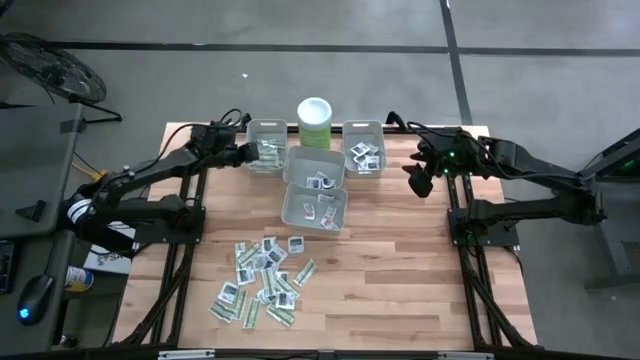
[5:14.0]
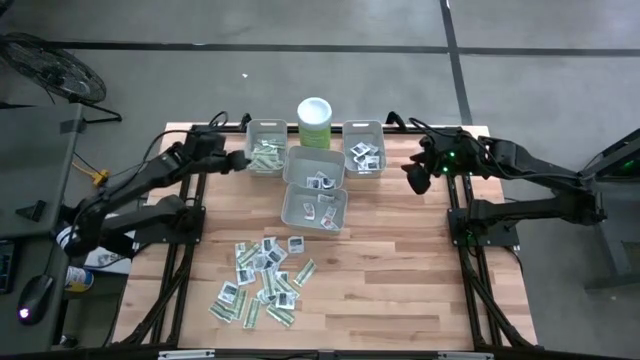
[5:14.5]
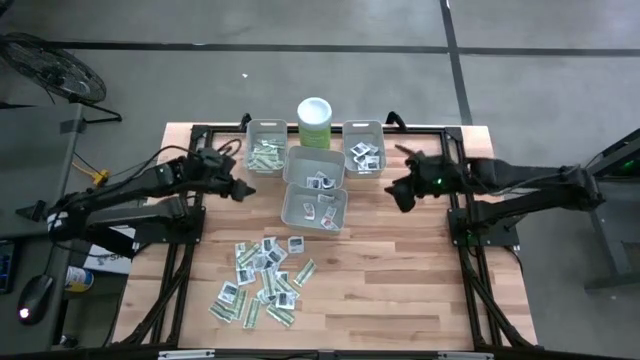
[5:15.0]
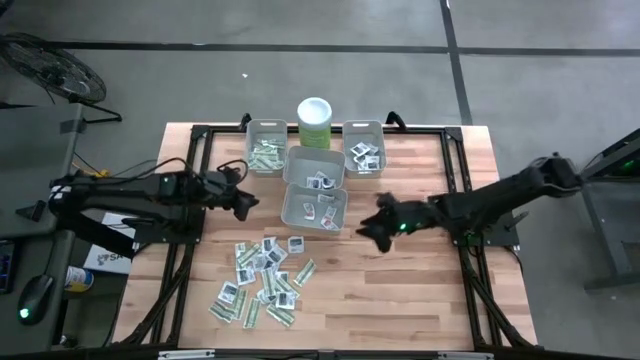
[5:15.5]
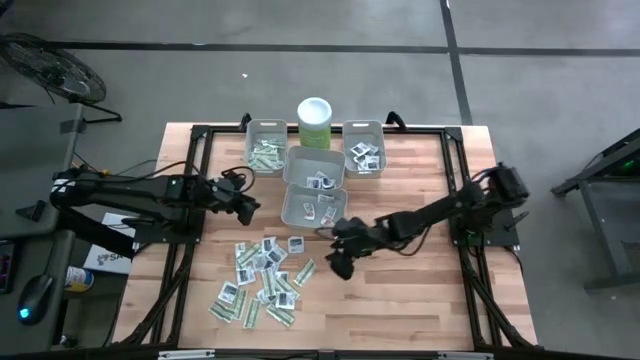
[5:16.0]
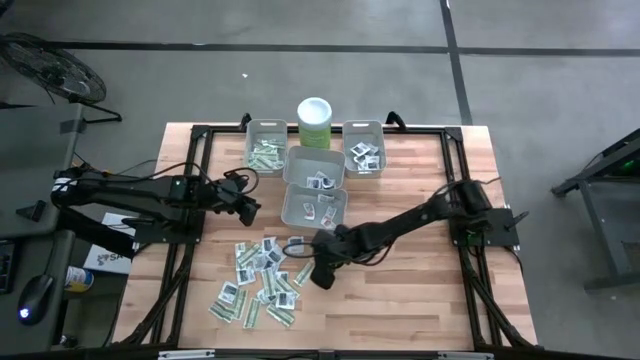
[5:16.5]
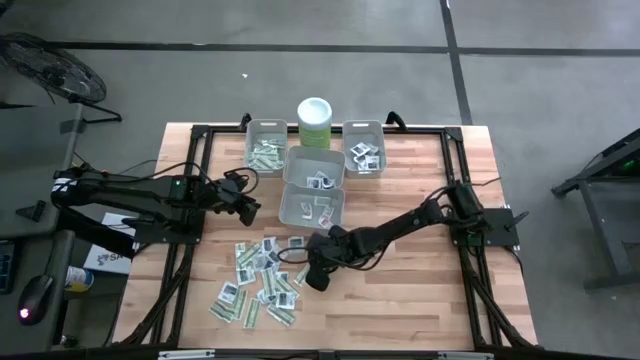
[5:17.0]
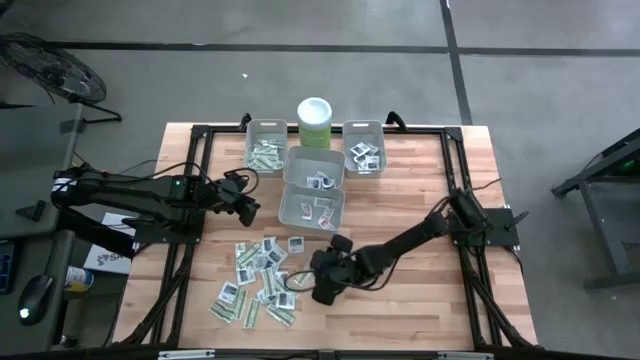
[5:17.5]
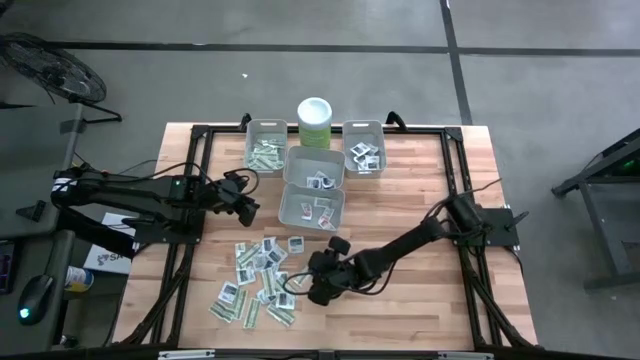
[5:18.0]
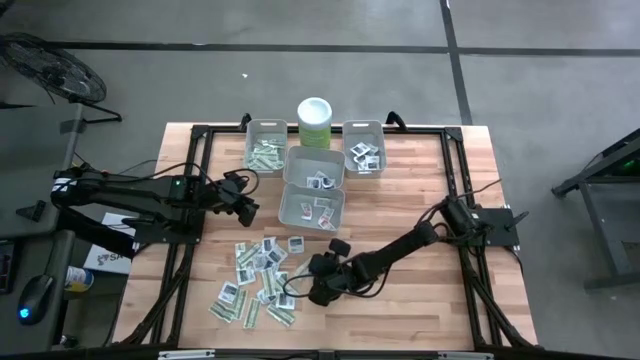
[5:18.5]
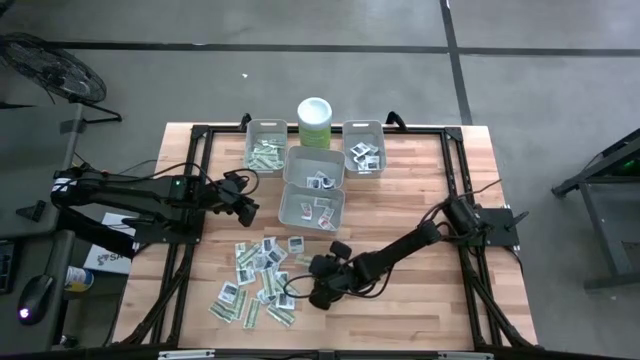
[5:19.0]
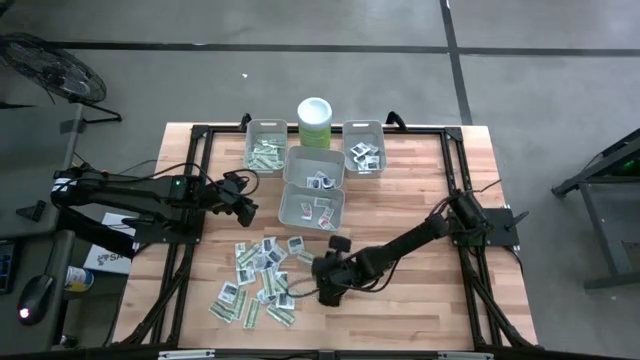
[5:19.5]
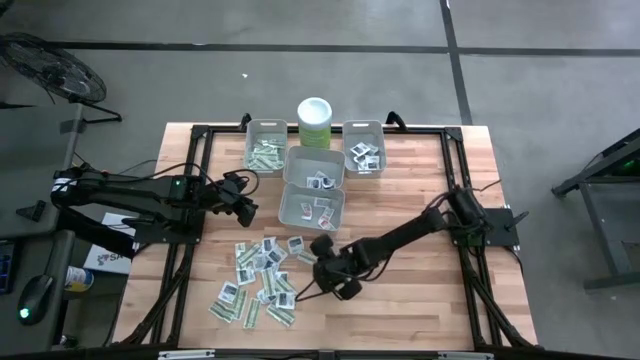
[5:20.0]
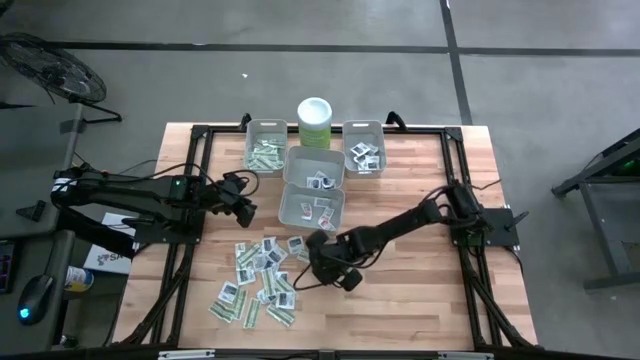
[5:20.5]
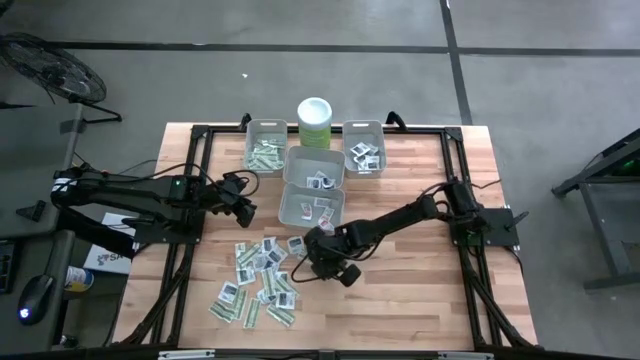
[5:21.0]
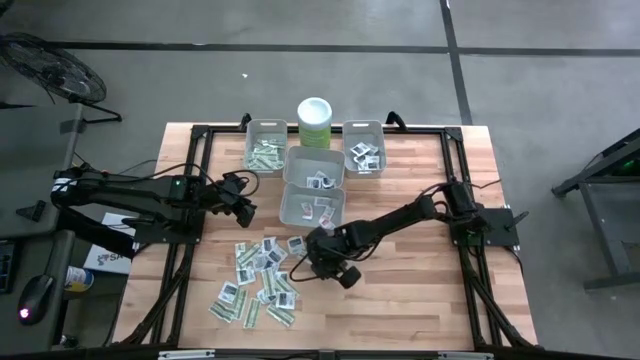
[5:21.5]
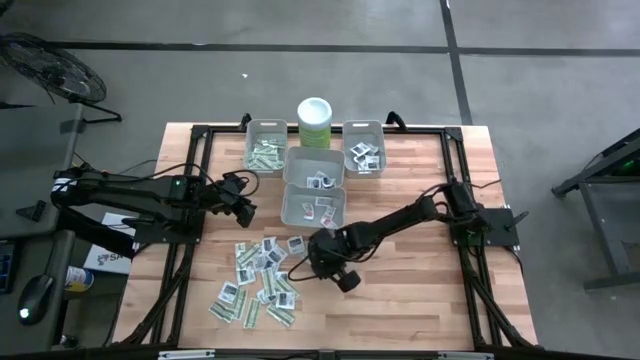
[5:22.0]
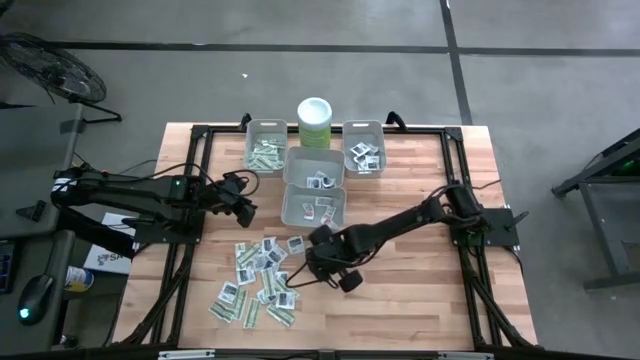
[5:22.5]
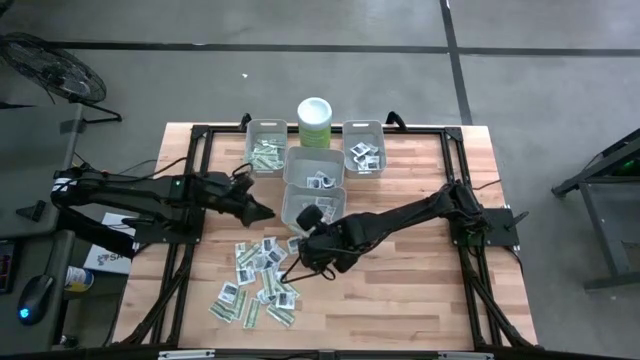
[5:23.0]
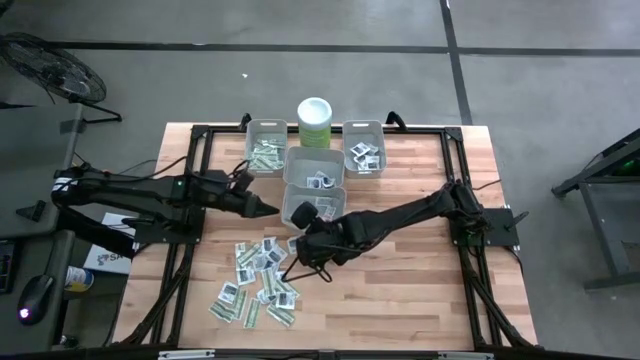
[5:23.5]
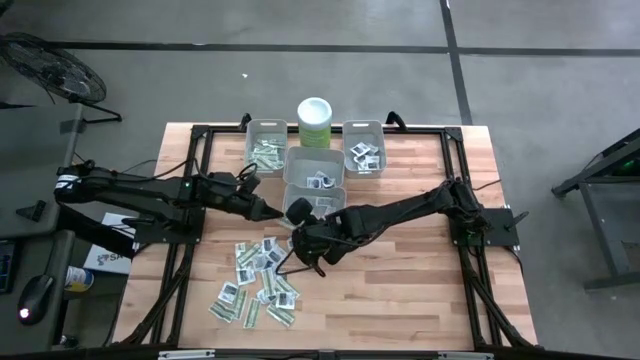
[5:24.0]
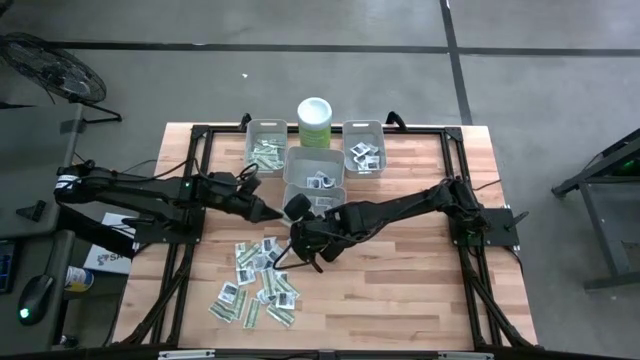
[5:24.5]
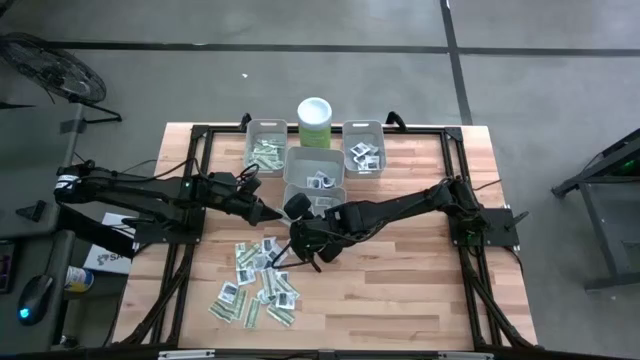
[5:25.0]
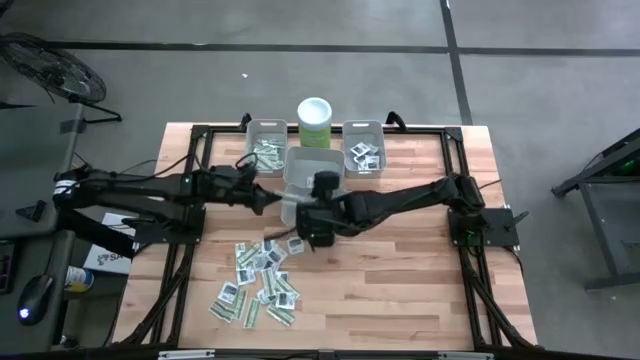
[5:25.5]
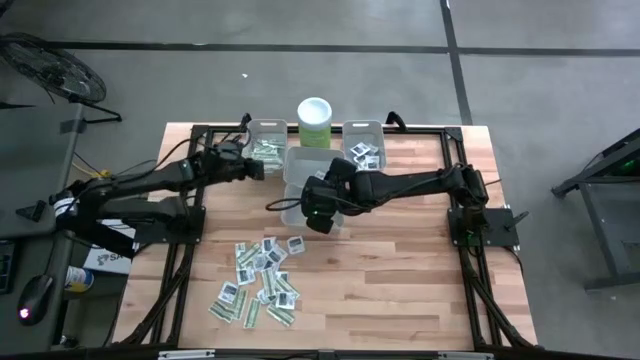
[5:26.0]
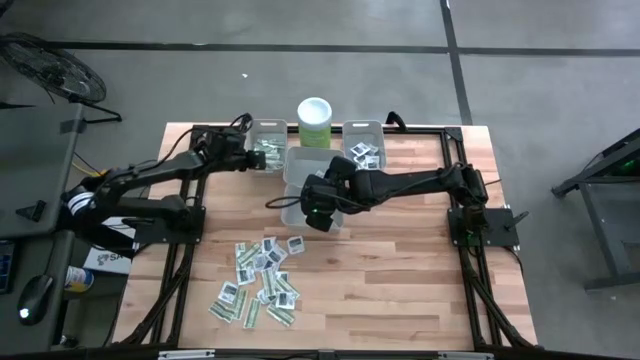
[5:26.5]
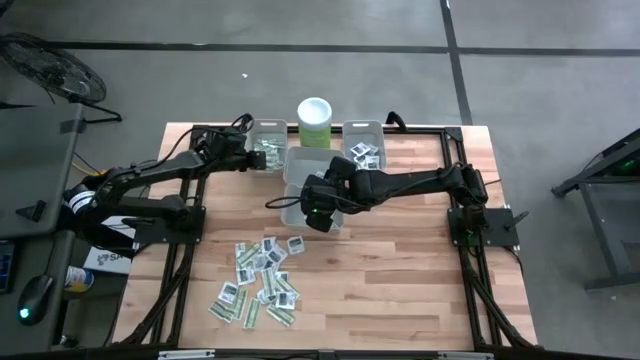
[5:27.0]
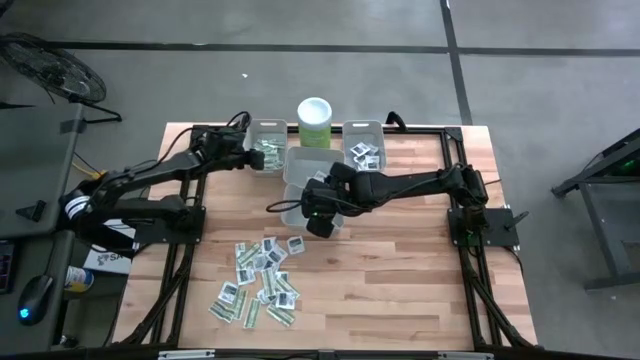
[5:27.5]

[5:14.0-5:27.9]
Task: Pick & Place First Aid Supplies
Put the bandage pack into the left bin

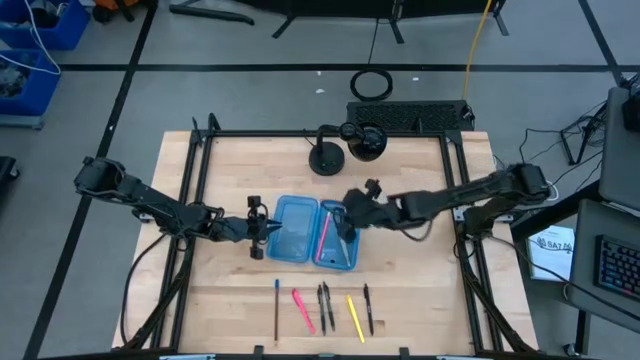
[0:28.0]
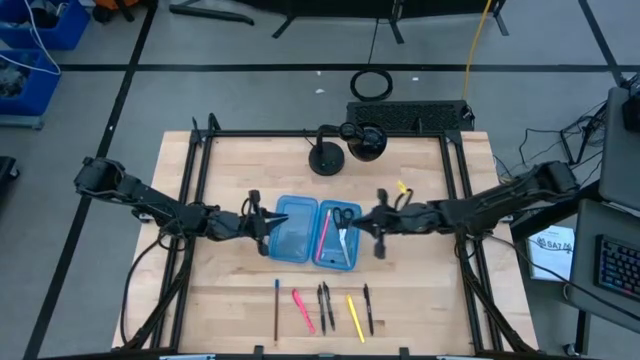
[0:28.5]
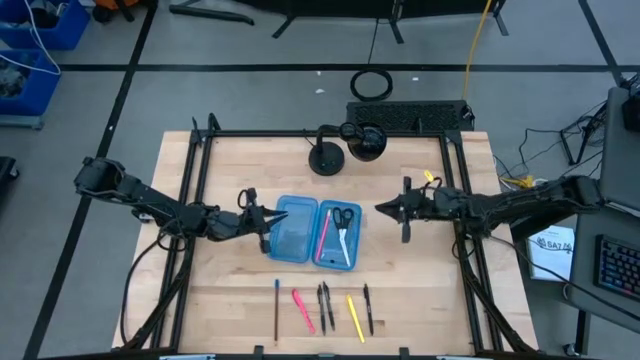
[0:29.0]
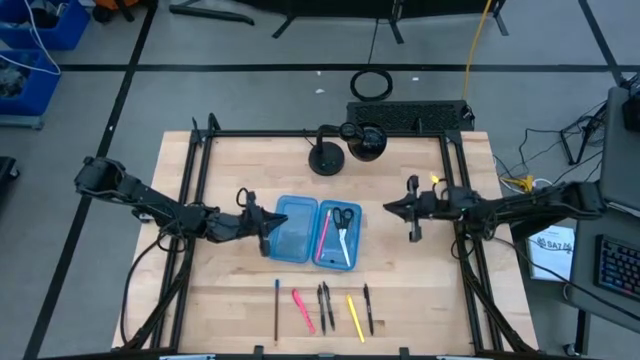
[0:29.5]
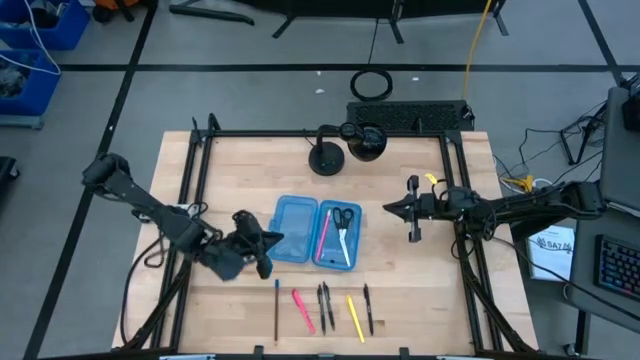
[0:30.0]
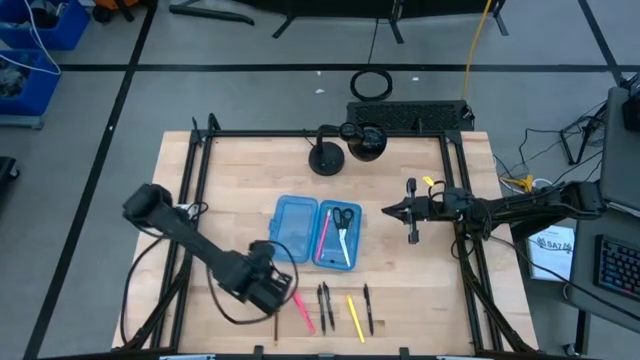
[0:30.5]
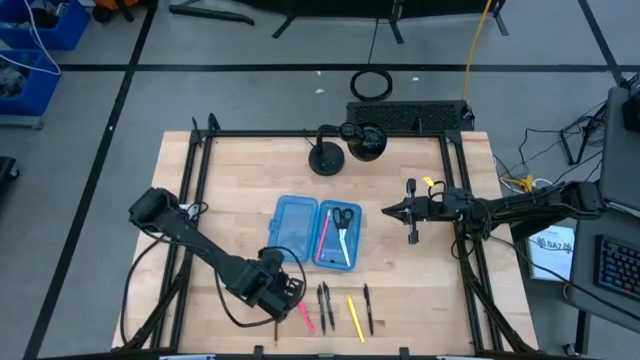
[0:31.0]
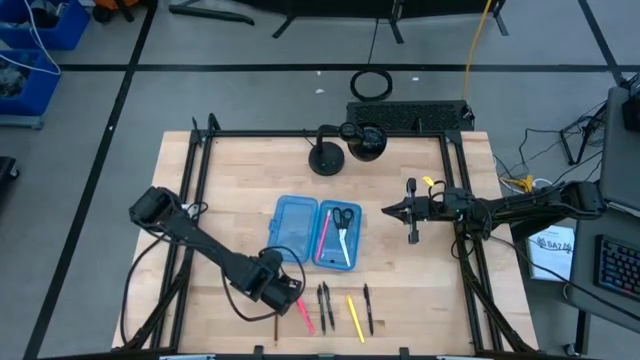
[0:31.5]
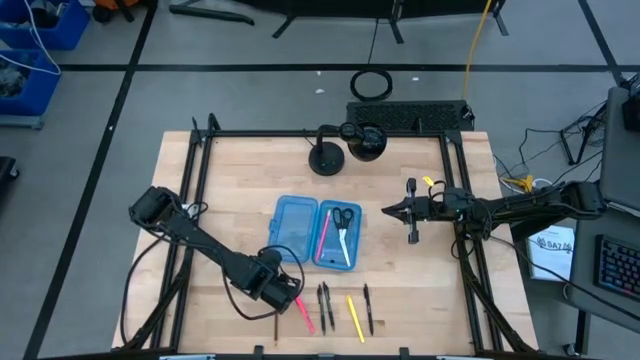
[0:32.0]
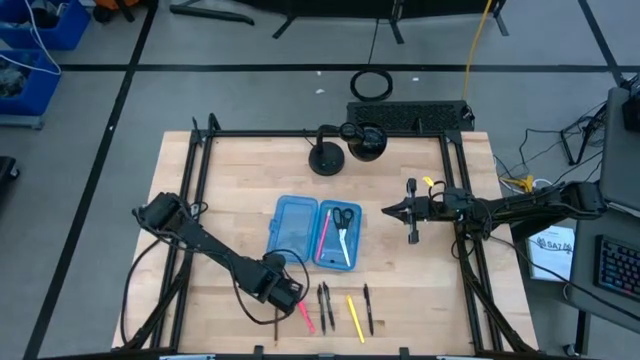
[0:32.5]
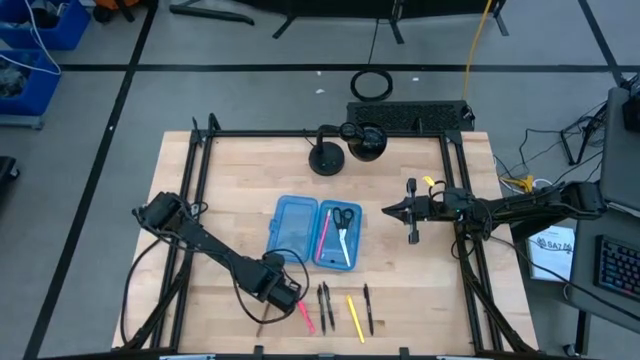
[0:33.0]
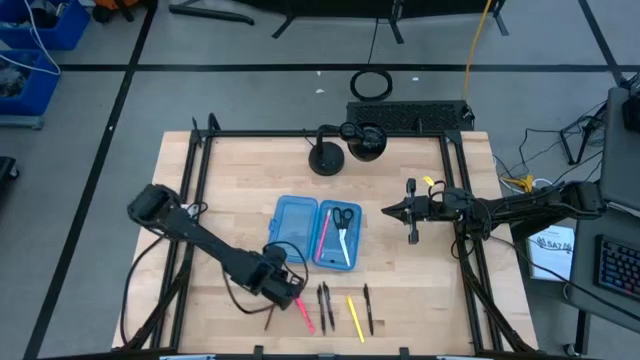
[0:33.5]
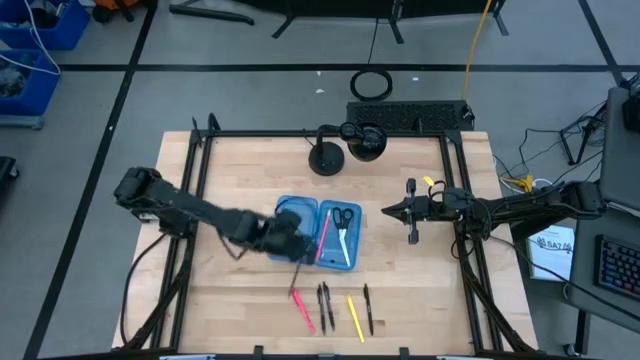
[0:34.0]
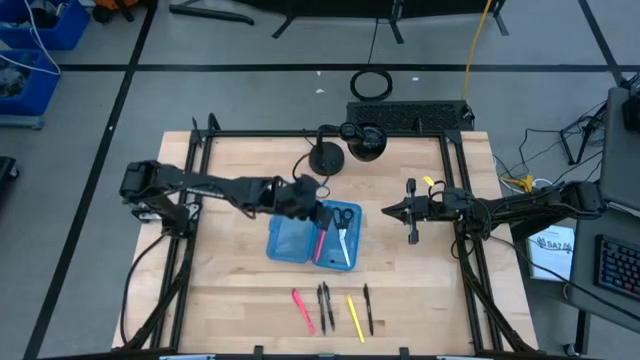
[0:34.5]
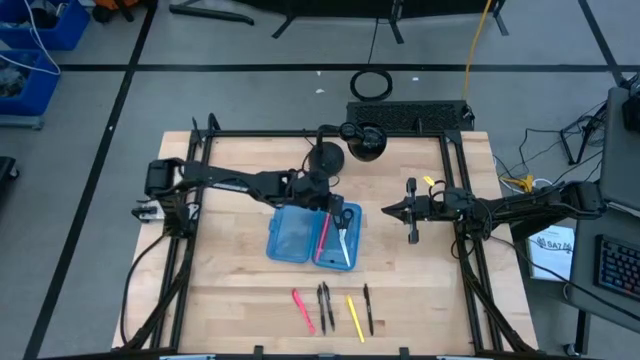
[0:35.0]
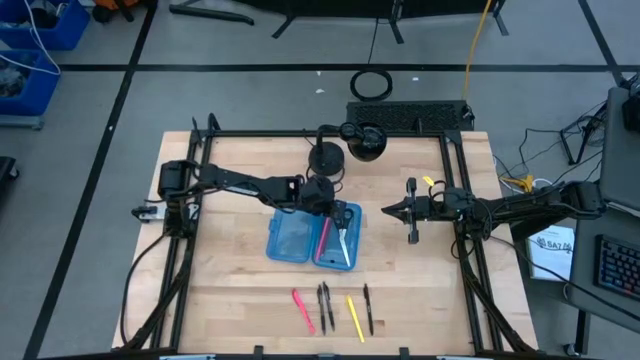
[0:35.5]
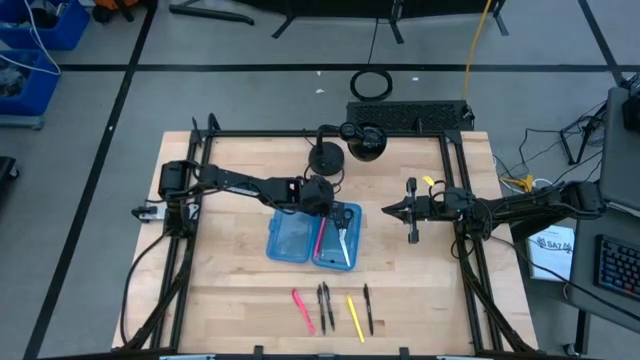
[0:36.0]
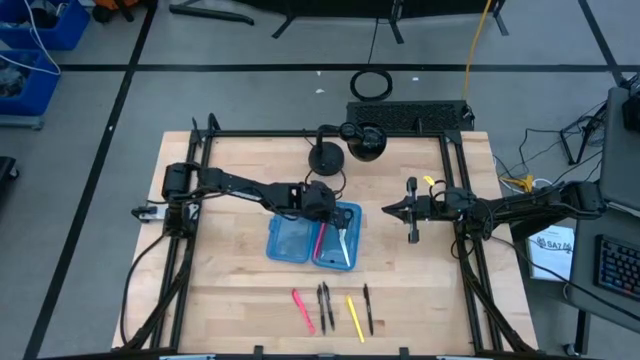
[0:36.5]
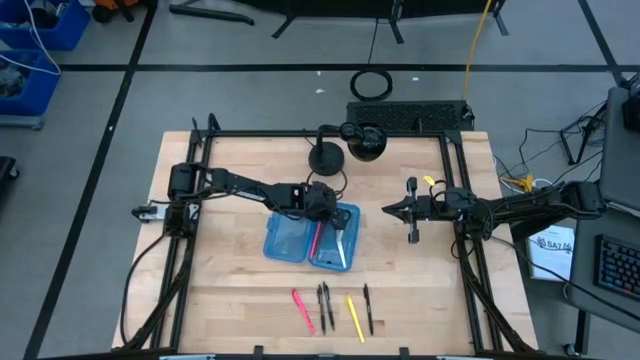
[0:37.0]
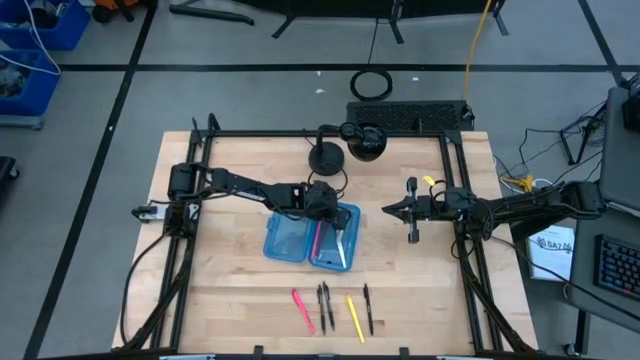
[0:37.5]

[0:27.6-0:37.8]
Task: Pick & place school supplies into a supply box
Put the brown pencil into the blue supply box
